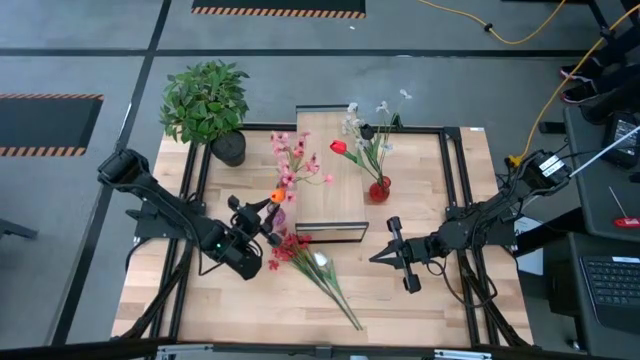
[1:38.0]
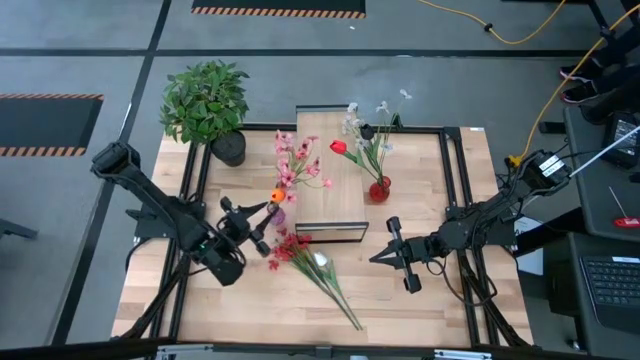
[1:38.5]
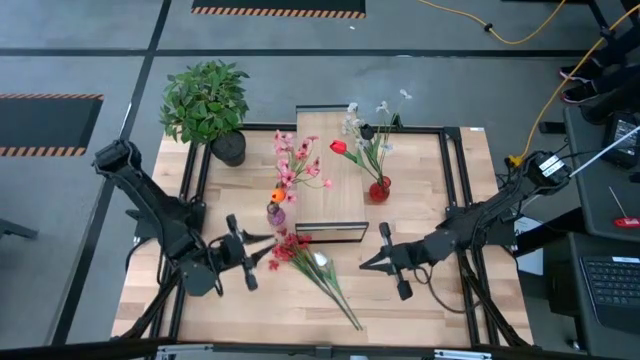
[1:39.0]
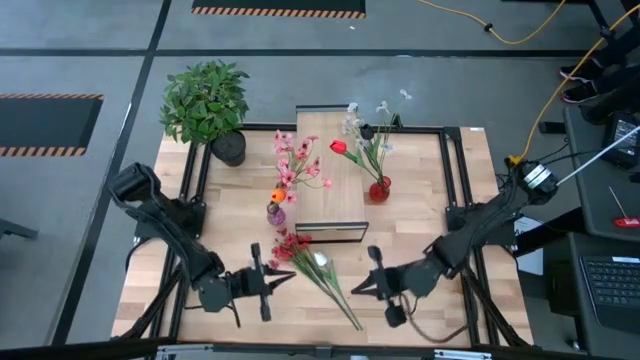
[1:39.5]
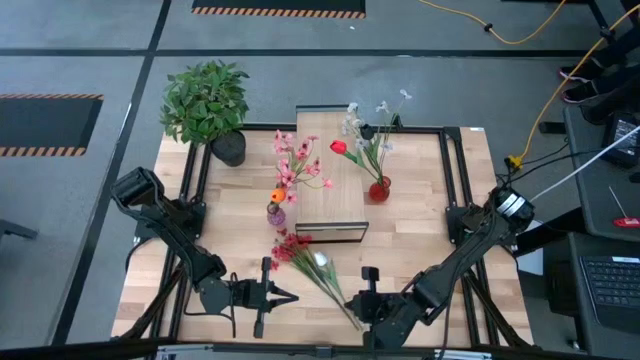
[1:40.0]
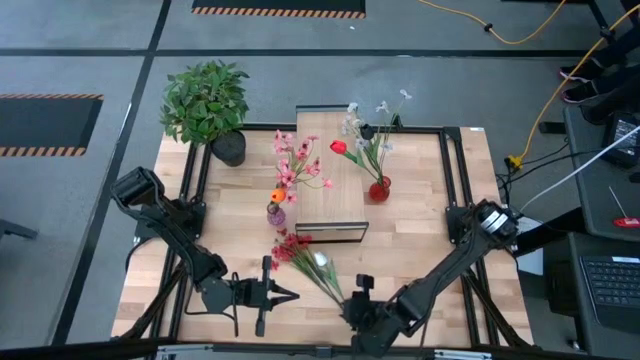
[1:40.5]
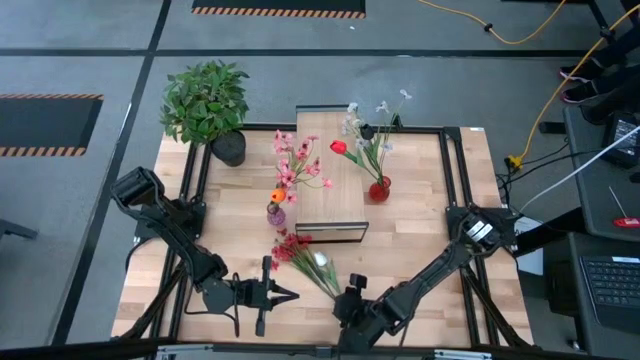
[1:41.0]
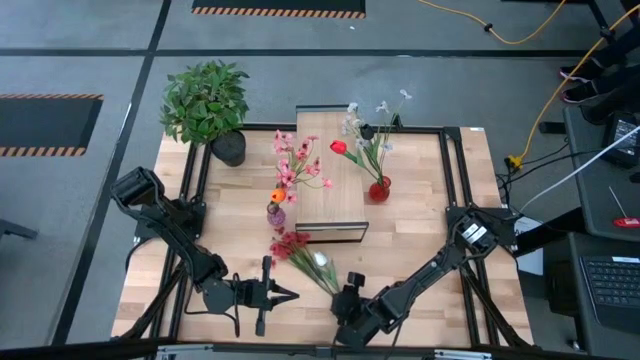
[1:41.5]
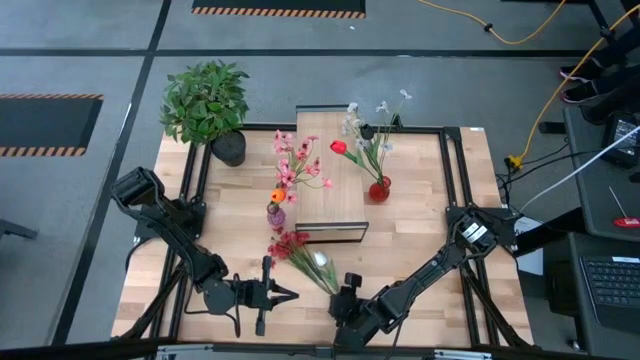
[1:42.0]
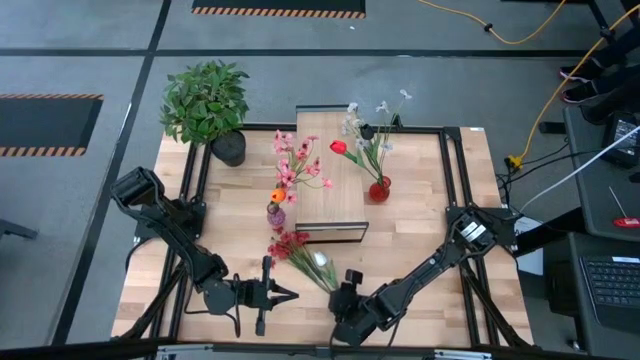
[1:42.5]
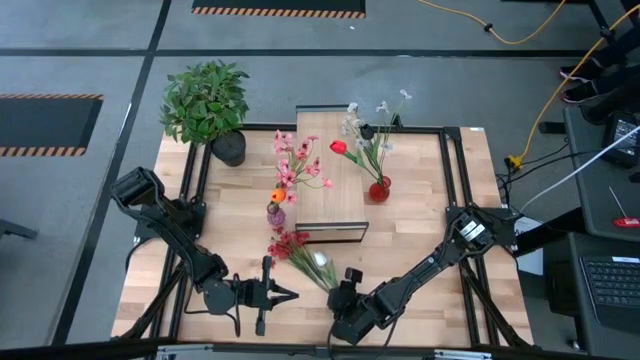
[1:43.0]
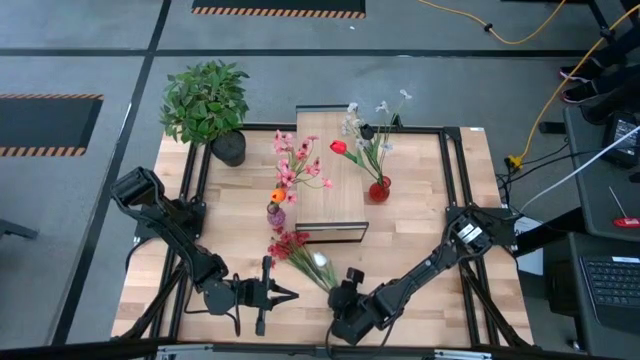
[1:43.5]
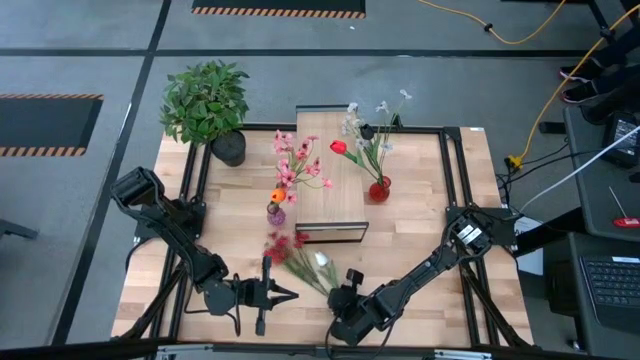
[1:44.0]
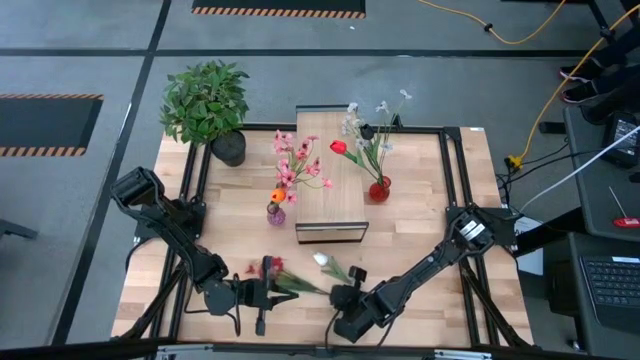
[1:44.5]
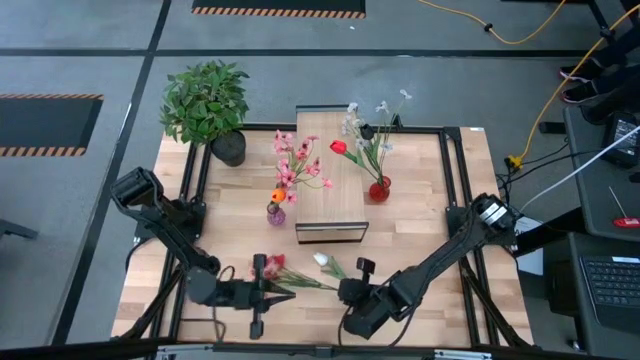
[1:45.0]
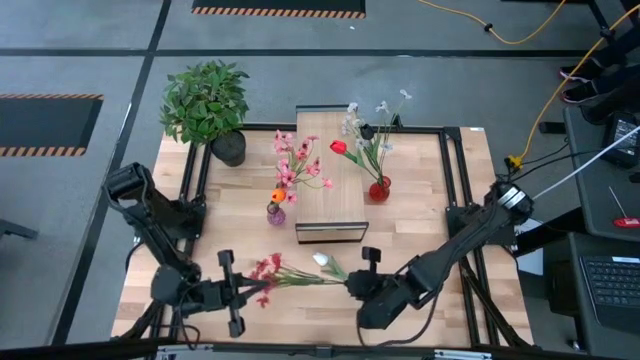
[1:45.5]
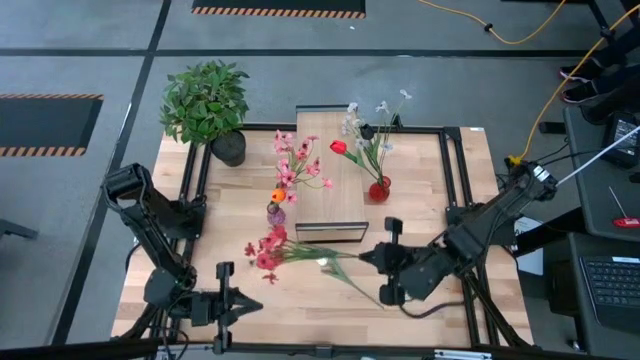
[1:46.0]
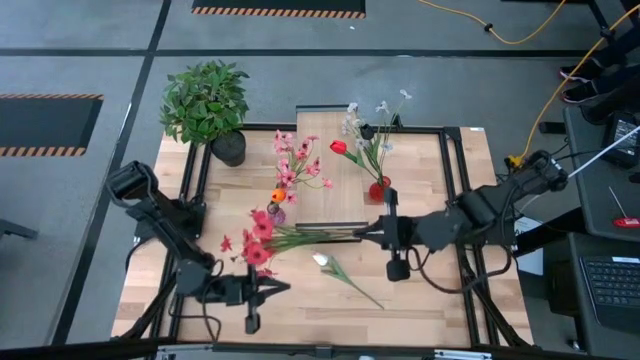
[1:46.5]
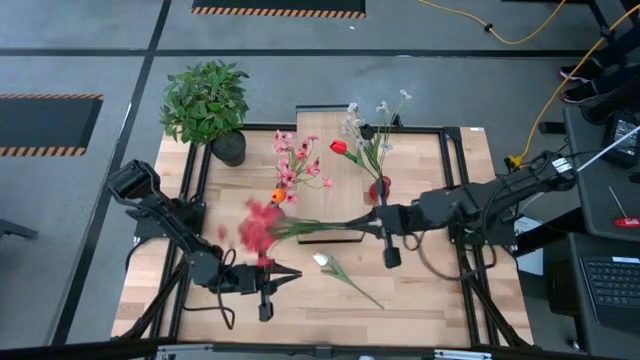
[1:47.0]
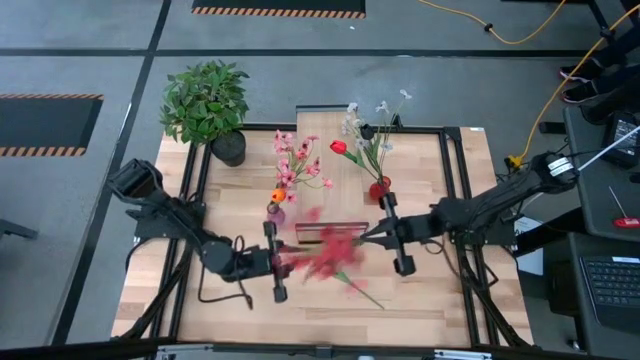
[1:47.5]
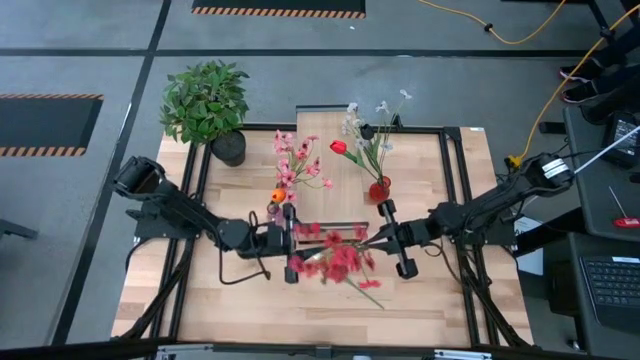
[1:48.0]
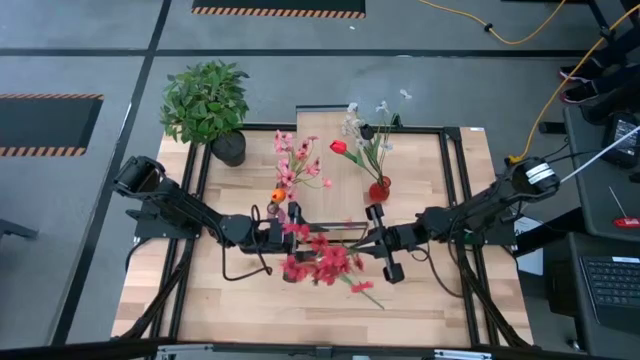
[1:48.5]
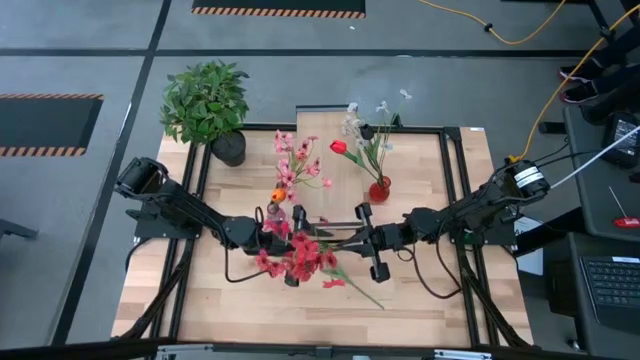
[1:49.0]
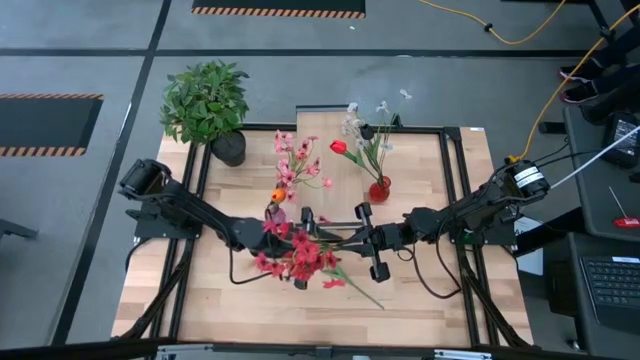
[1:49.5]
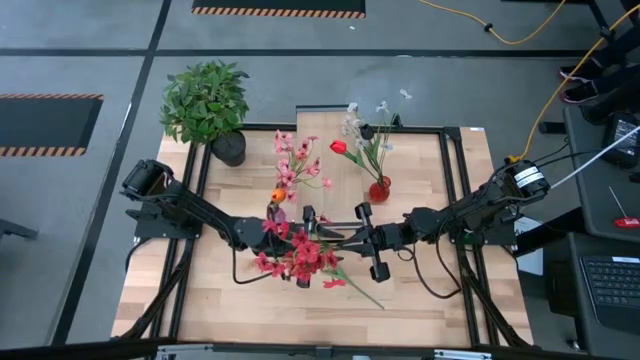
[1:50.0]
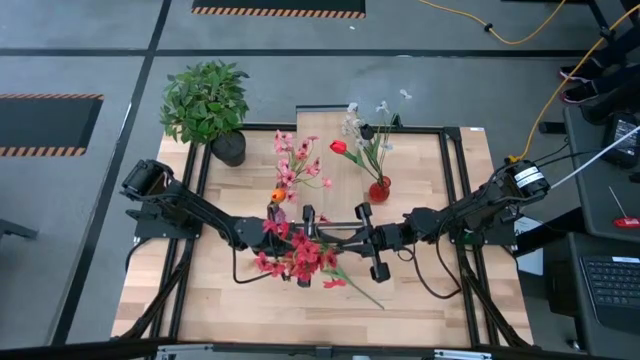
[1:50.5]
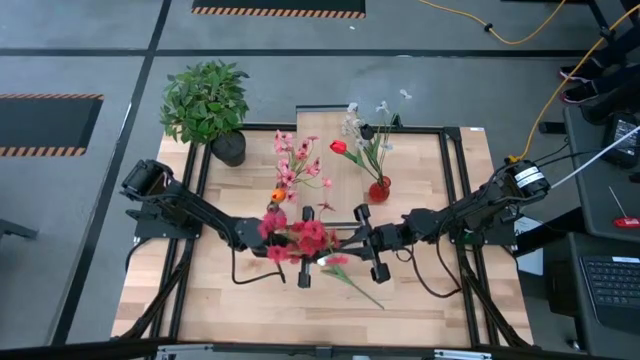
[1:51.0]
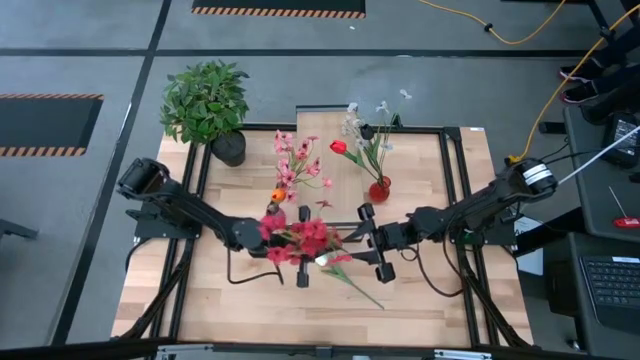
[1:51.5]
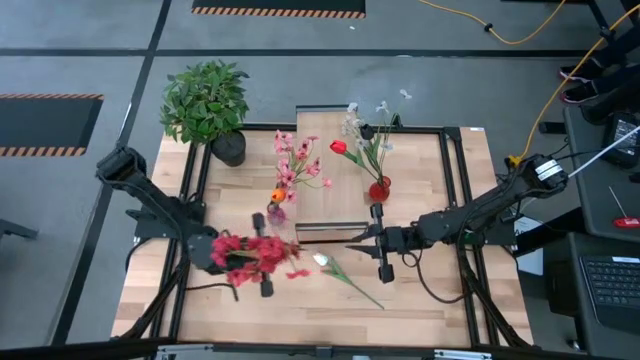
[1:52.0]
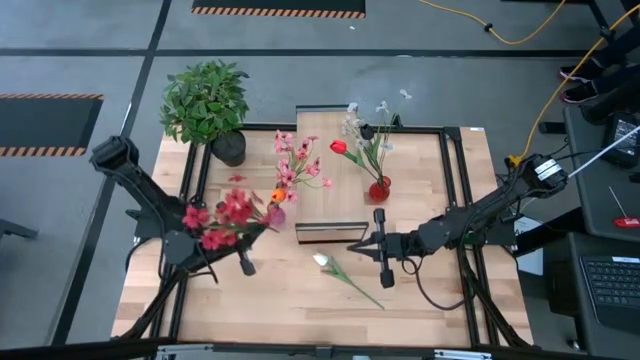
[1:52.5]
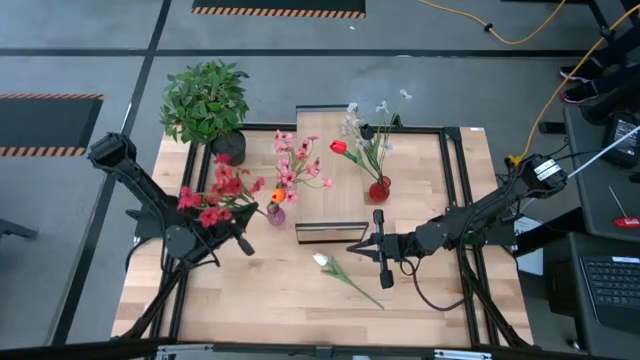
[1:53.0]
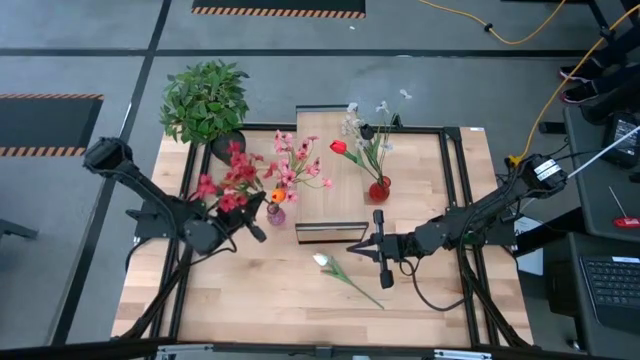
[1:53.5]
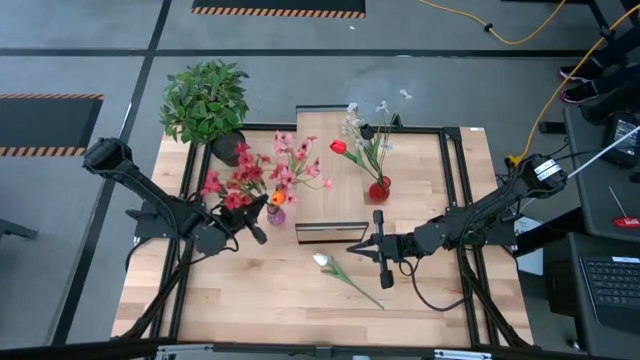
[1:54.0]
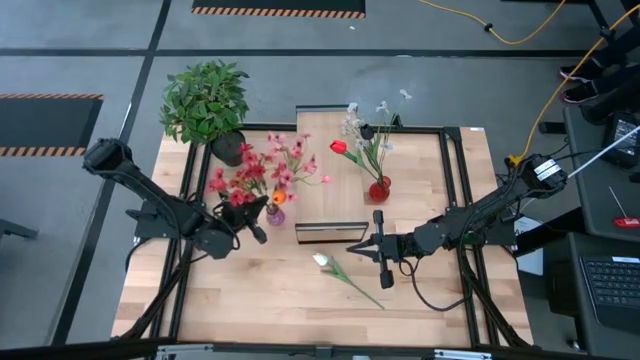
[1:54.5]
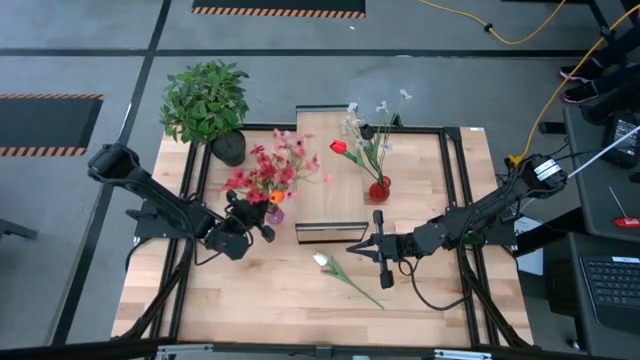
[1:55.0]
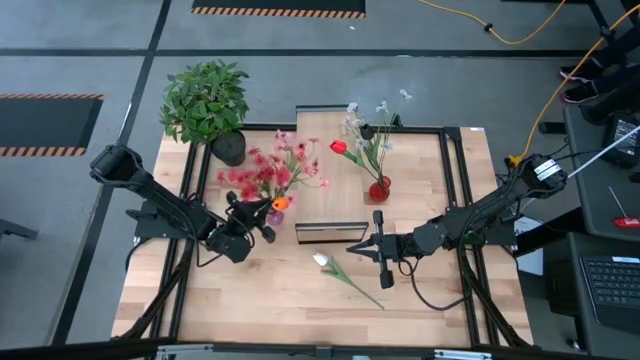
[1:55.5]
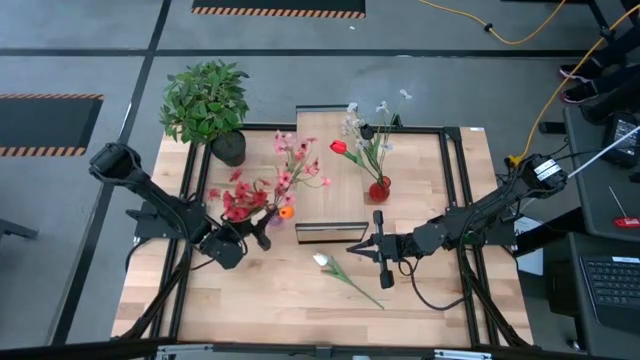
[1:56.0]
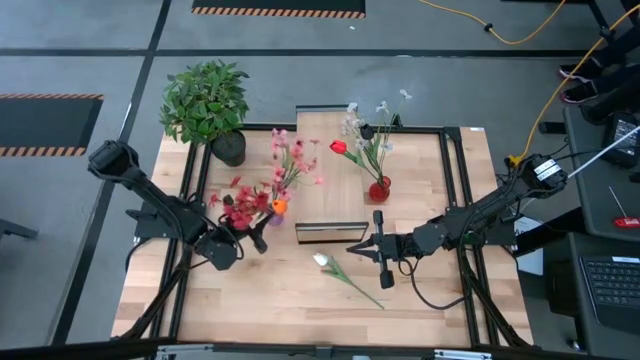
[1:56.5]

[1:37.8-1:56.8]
Task: Pick and place flowers into a vace then onto a shelf
Put the red flowers into the violet vase

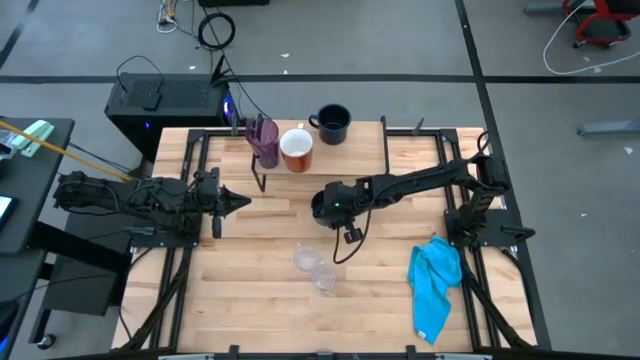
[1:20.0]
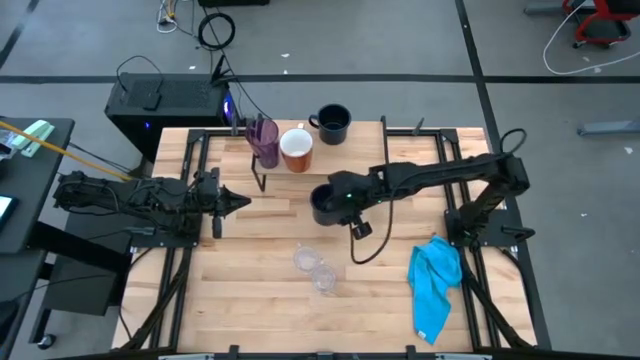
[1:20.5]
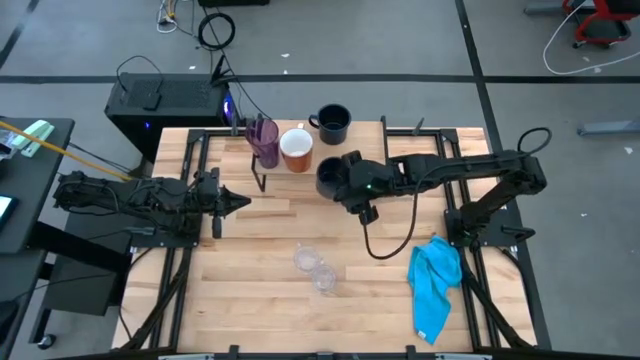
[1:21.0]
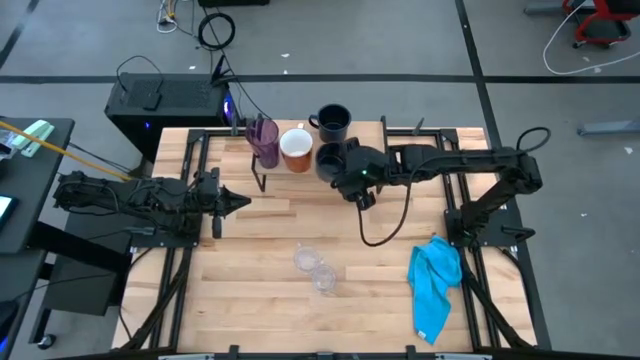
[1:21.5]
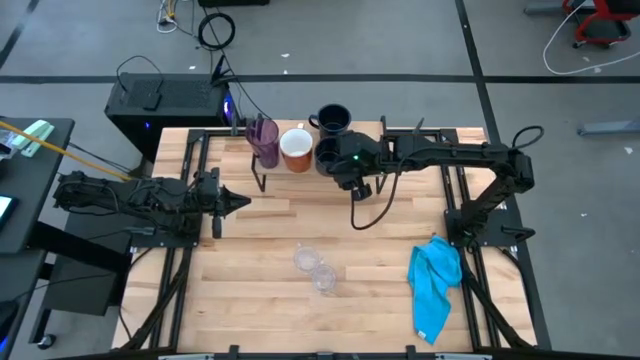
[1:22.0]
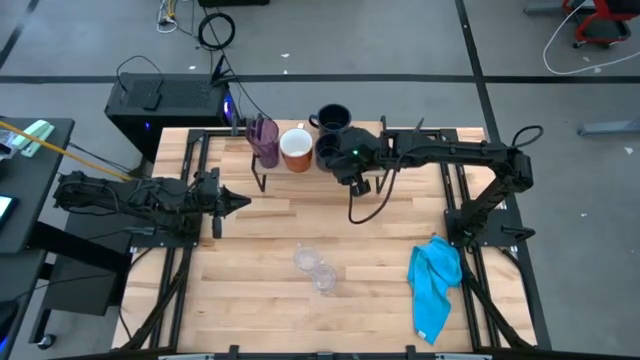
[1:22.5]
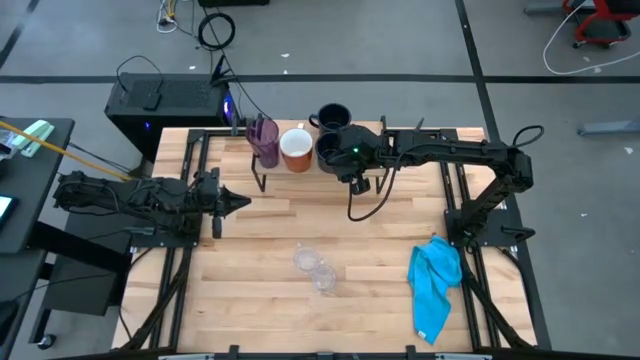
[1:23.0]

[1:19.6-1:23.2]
Task: Stack small to large cups/mugs on shelf
Put the dark blue mug on the shelf
